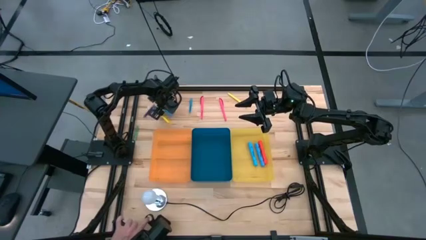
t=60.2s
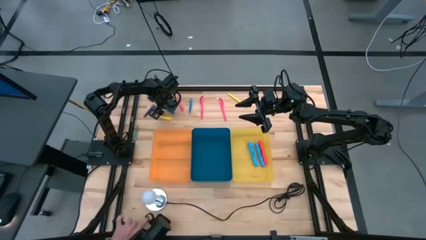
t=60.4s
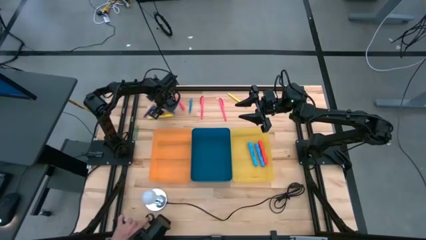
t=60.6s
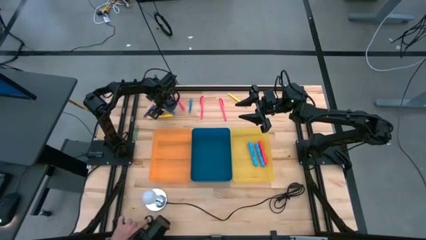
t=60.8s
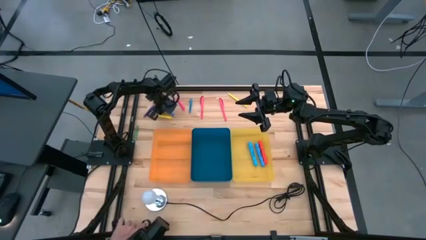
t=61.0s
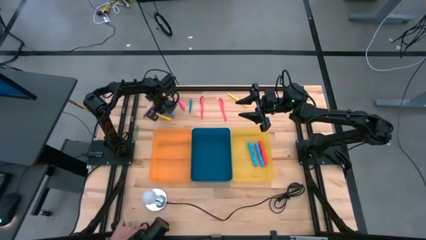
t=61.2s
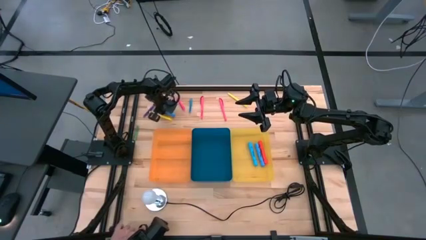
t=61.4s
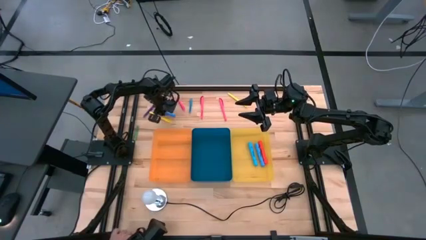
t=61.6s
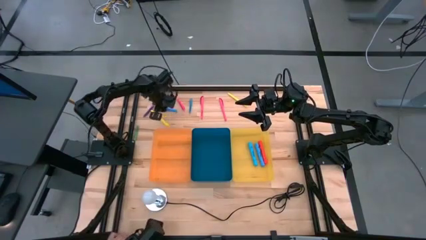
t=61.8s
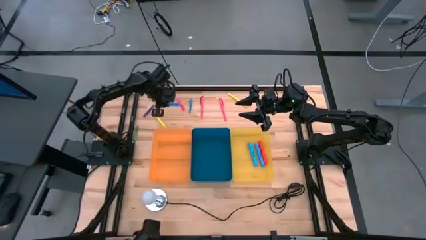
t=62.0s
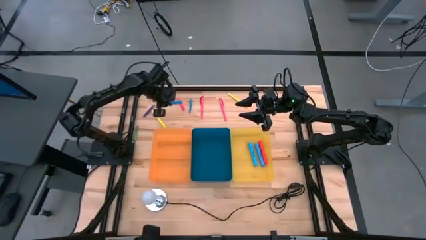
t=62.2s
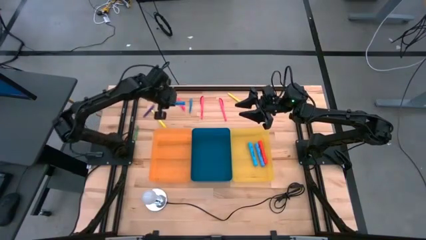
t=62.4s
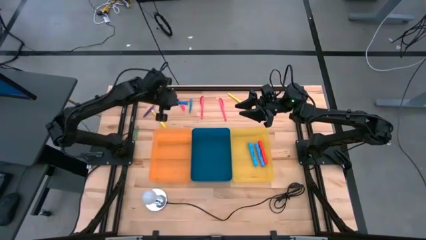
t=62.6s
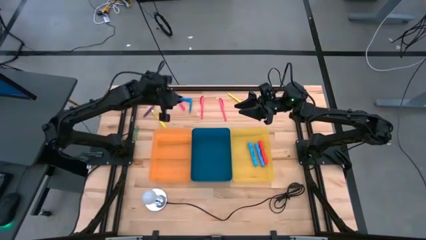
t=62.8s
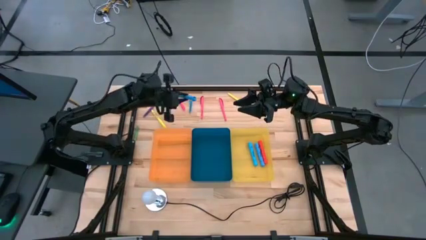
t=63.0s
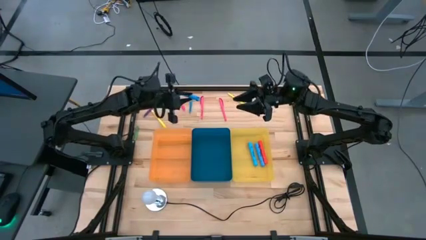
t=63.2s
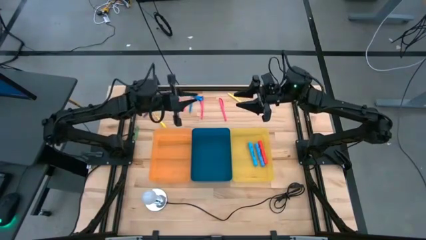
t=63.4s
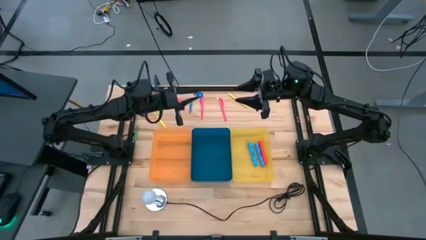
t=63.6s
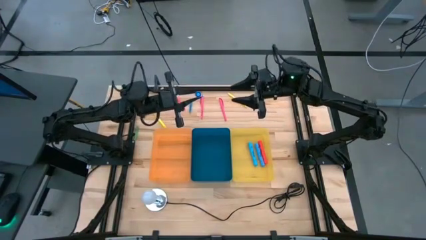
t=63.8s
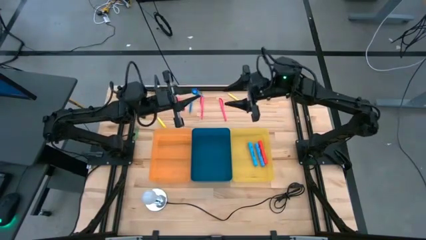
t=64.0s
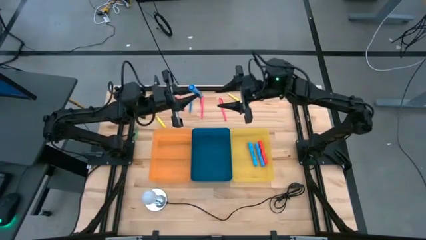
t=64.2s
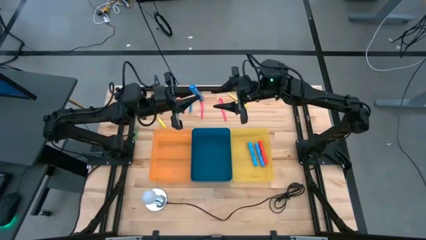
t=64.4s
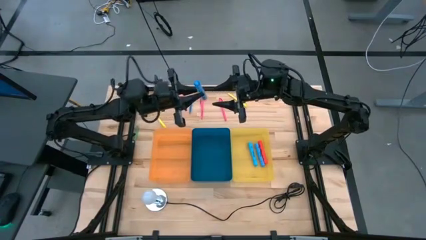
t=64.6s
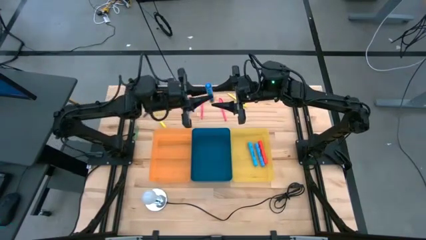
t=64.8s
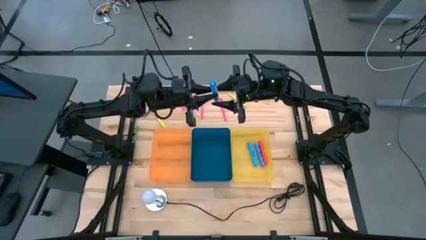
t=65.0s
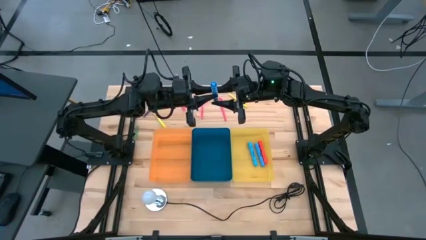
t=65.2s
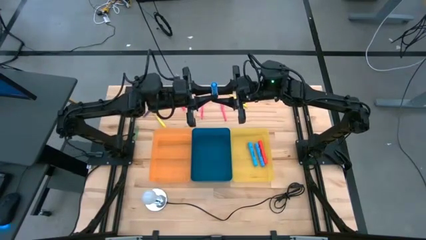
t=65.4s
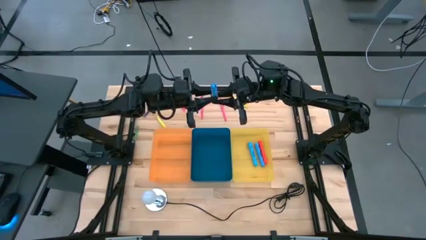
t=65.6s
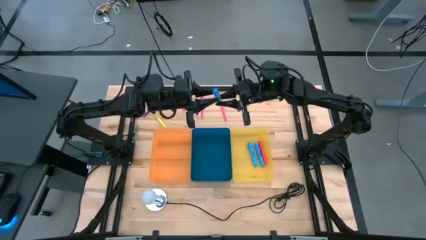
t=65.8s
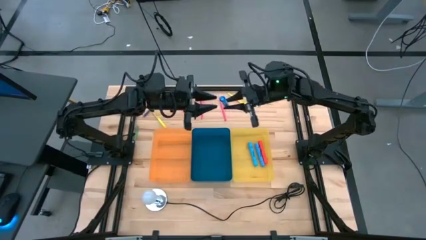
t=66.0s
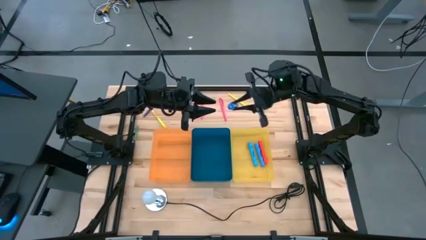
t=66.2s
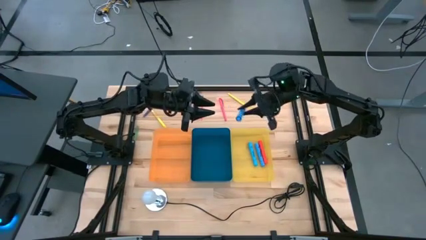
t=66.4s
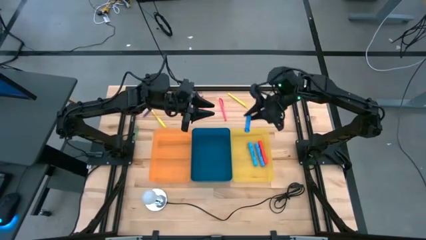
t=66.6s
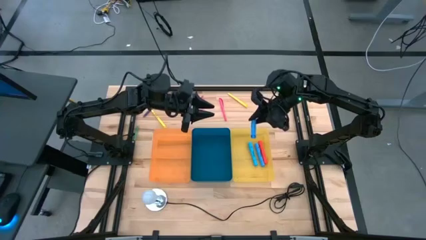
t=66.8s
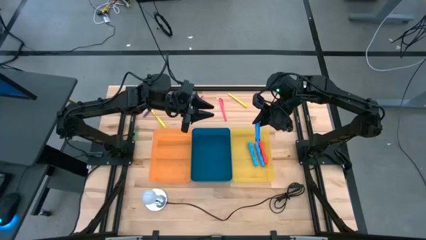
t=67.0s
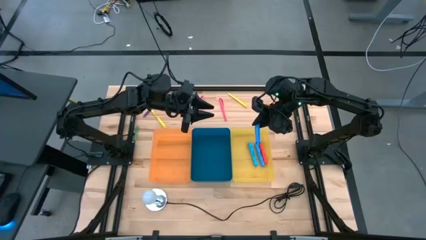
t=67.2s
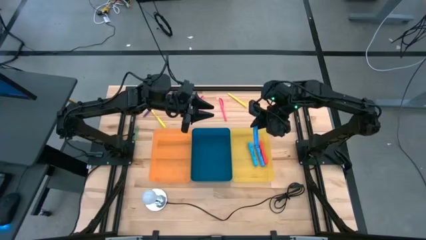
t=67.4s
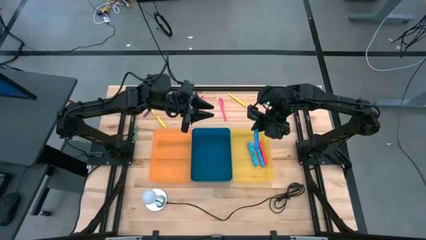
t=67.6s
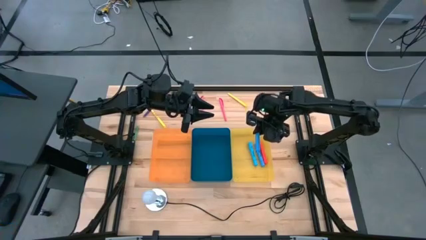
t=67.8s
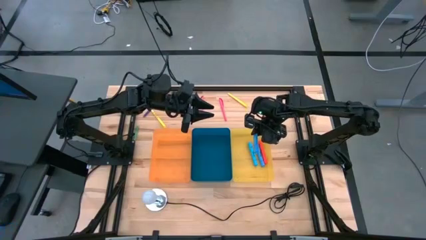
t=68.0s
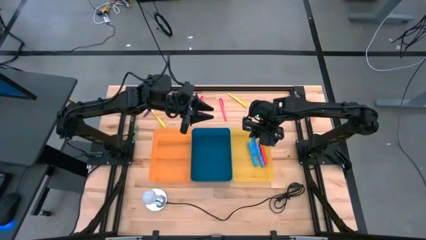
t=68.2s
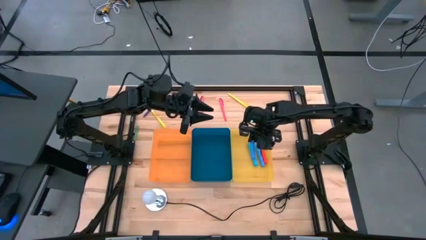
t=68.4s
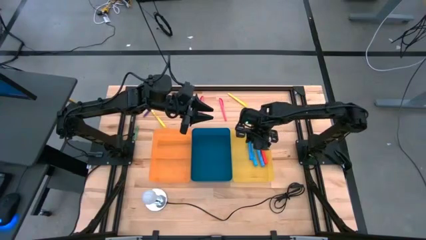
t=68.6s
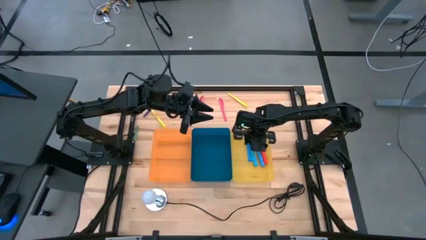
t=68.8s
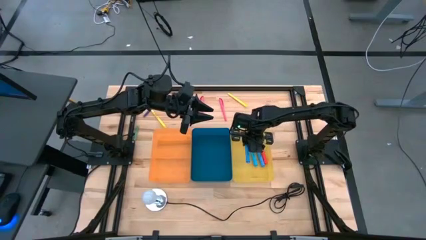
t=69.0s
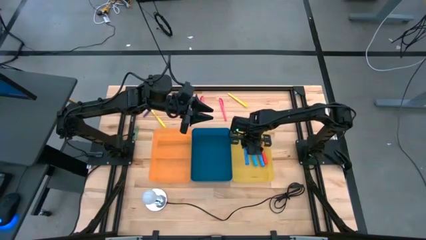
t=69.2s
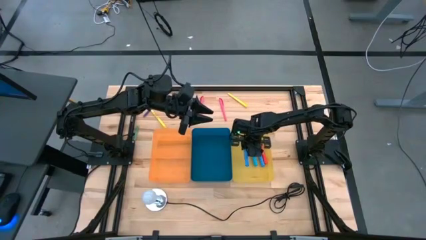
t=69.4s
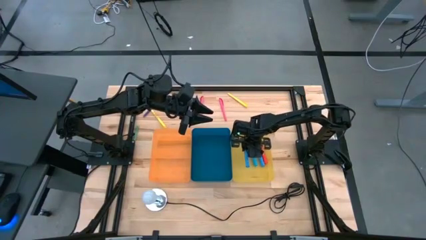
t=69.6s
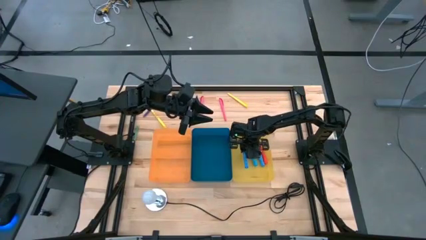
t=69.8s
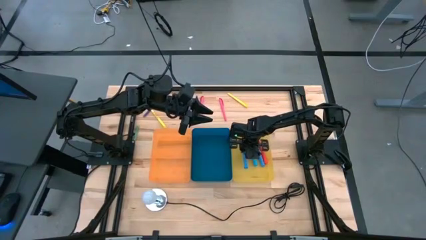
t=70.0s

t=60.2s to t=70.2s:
Task: Pick & Place Markers
Put the blue marker into the yellow bin

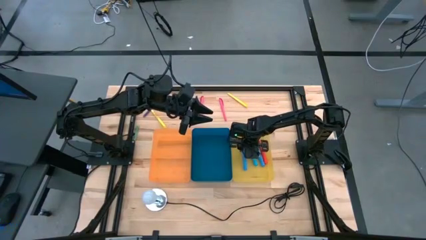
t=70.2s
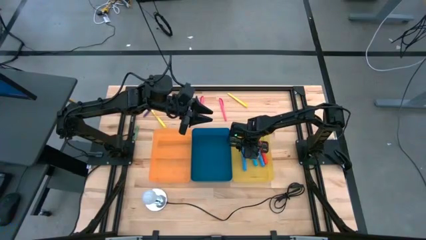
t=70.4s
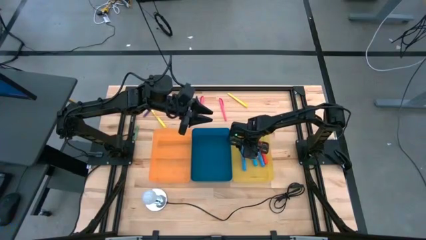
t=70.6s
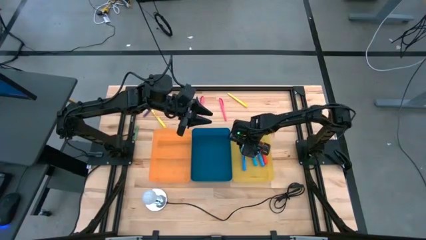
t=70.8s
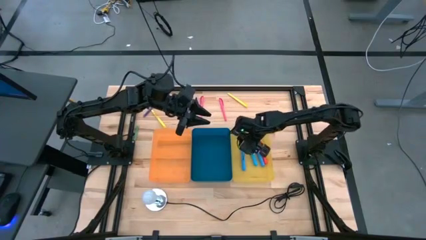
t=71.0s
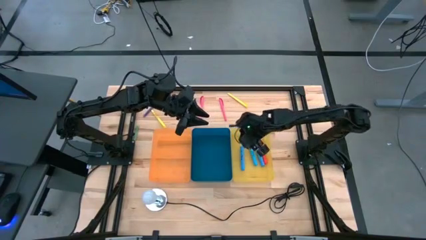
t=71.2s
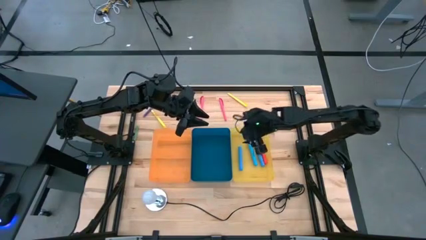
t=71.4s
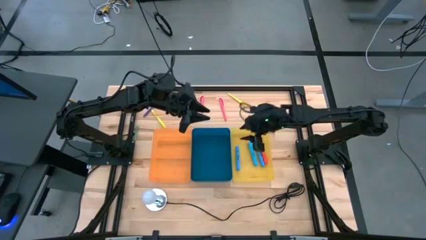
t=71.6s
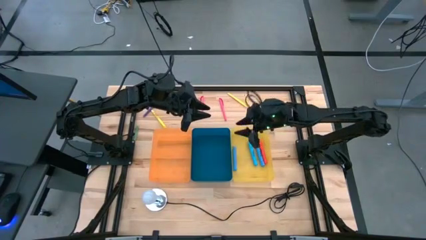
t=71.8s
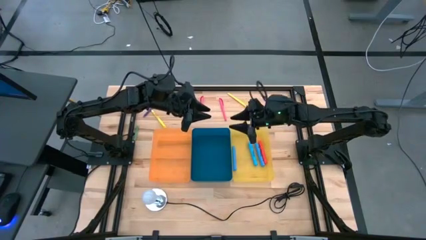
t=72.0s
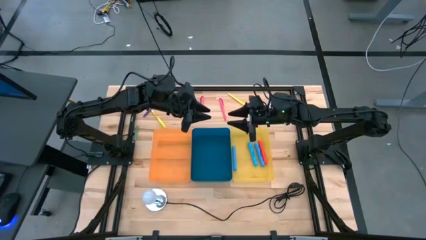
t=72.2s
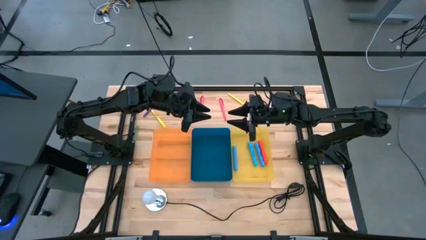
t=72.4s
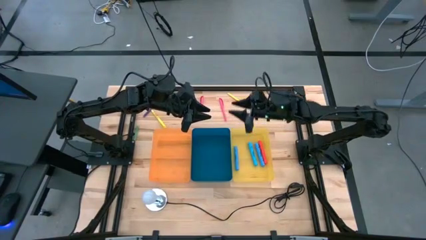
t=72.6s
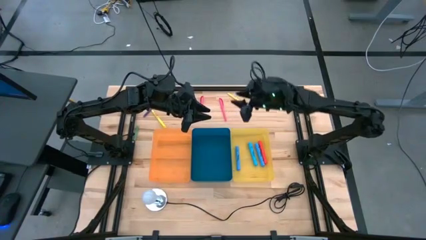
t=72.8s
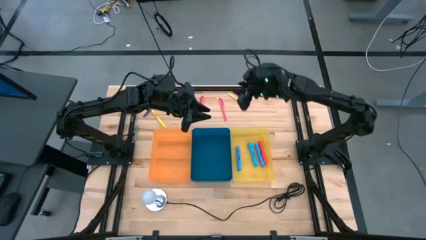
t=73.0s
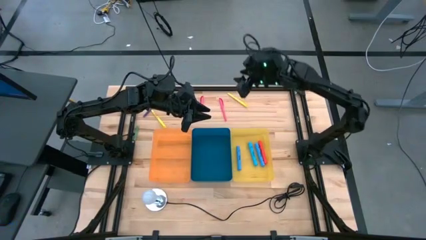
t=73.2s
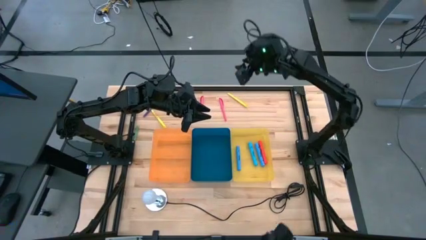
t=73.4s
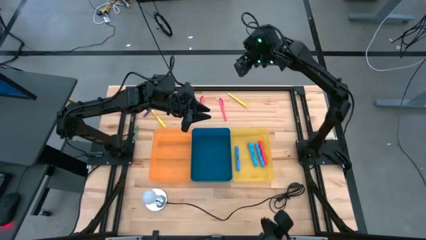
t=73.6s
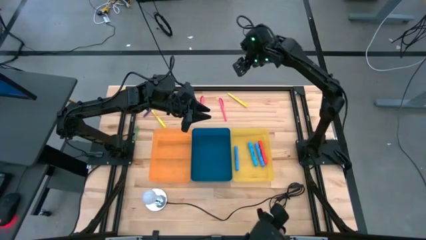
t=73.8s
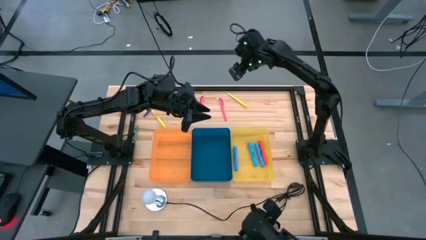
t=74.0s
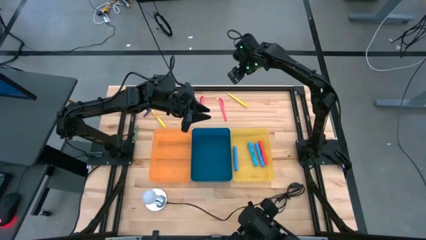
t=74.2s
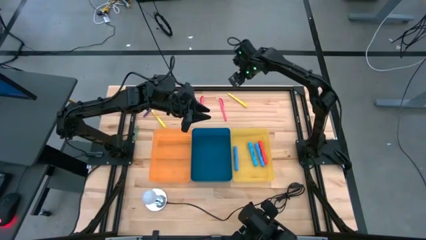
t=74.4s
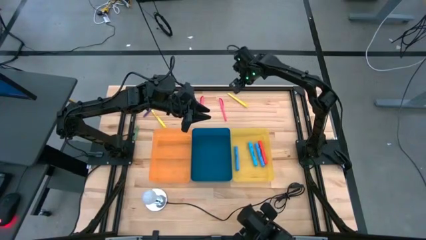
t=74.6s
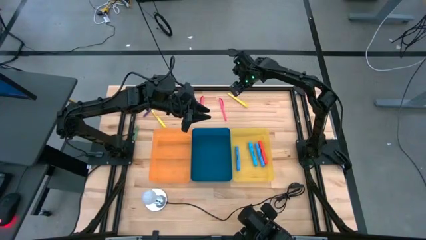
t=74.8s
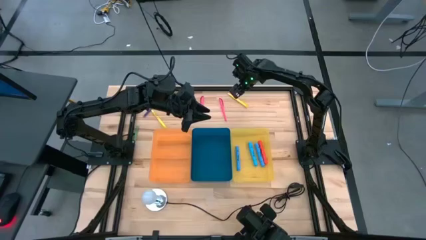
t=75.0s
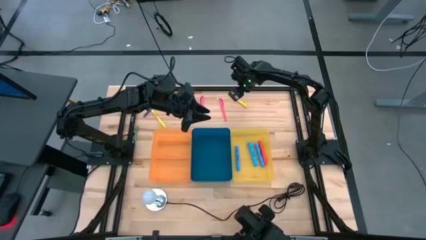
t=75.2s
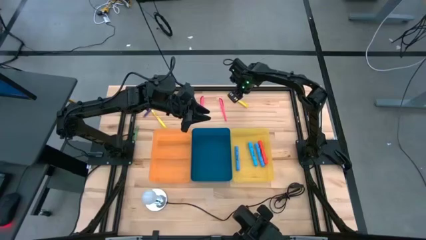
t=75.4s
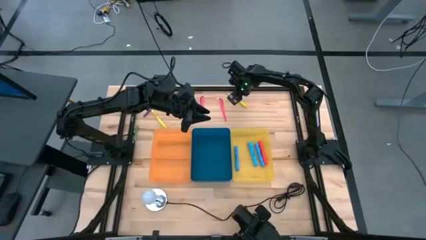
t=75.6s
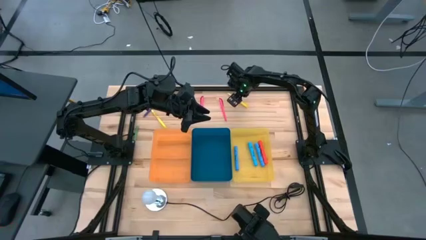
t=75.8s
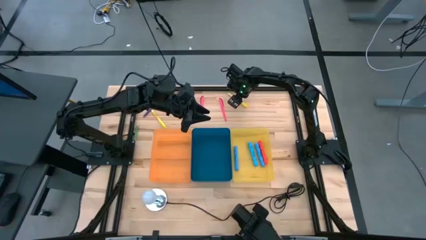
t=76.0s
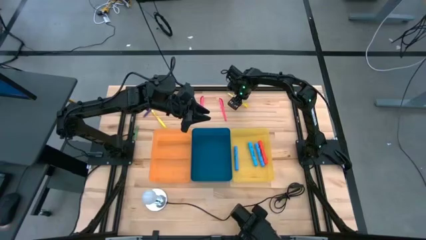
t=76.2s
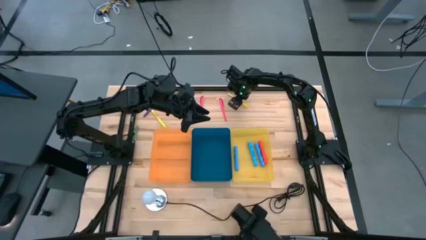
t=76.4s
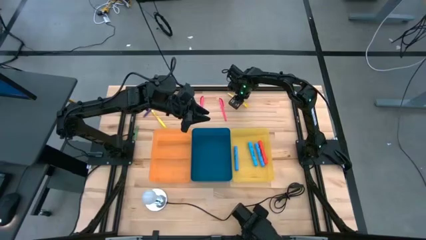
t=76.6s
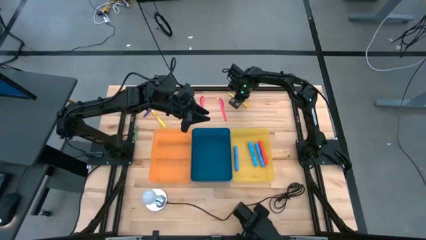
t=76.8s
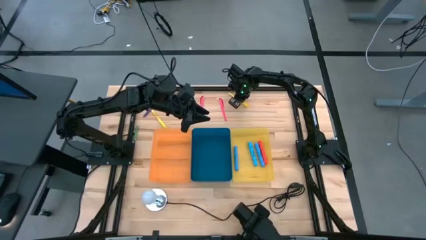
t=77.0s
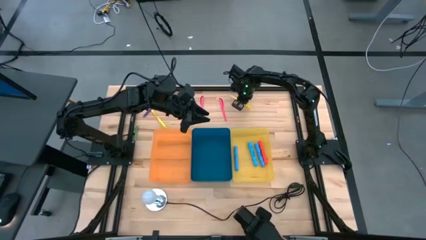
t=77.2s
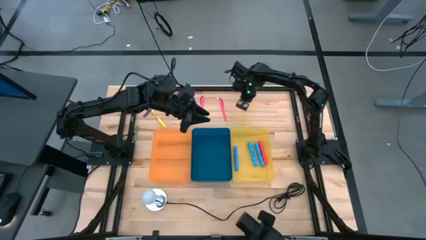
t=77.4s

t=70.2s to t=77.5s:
Put the right yellow pen into the blue bin
